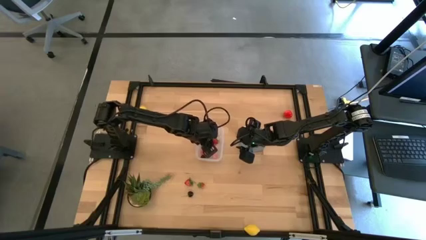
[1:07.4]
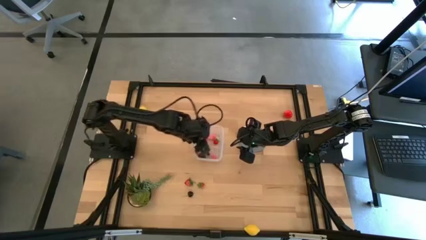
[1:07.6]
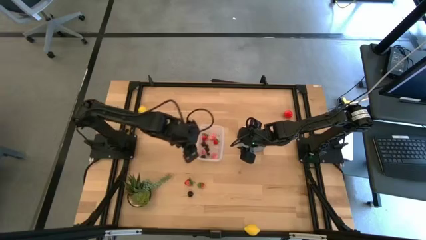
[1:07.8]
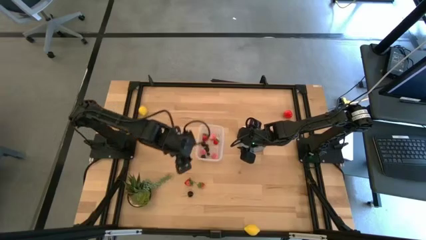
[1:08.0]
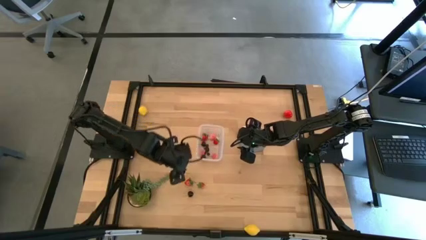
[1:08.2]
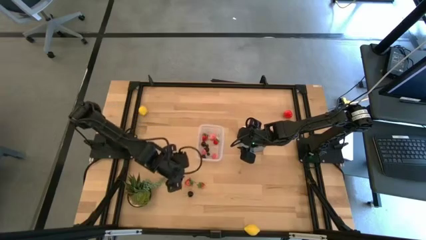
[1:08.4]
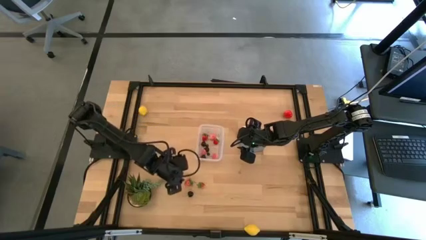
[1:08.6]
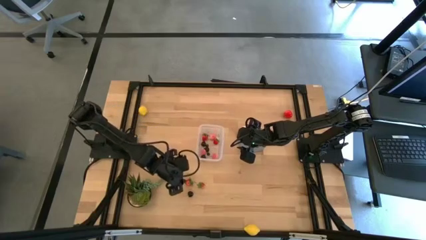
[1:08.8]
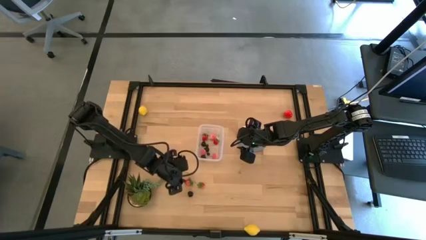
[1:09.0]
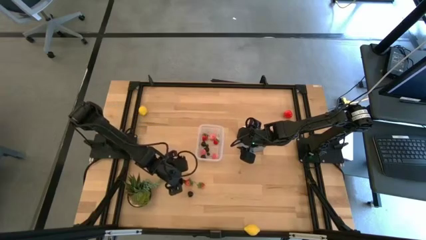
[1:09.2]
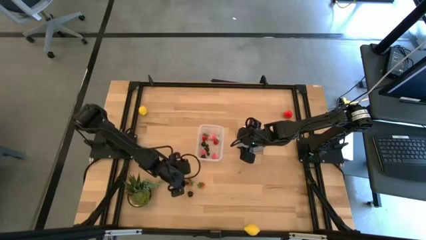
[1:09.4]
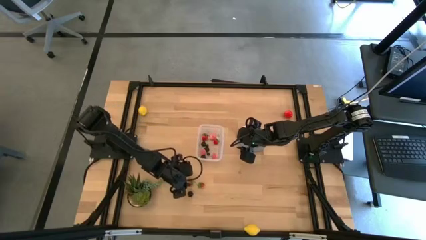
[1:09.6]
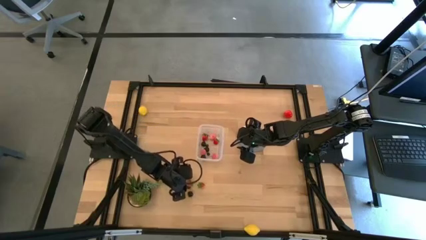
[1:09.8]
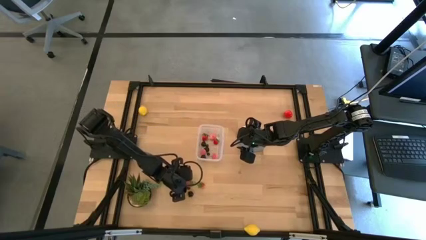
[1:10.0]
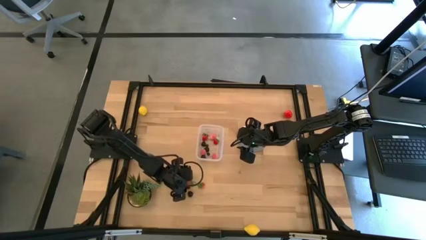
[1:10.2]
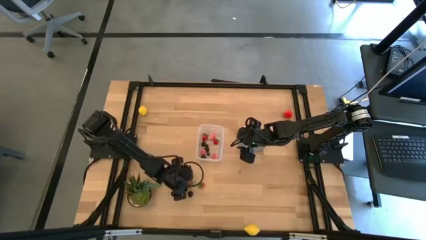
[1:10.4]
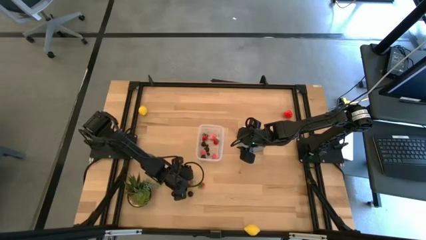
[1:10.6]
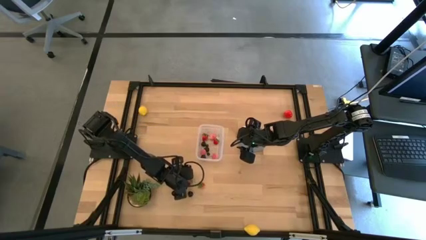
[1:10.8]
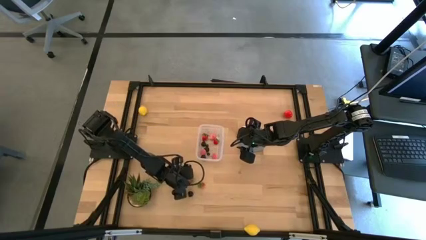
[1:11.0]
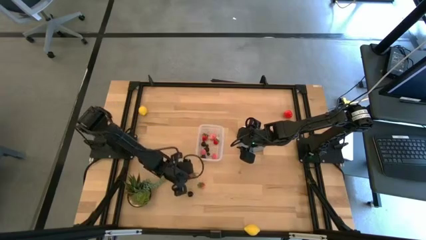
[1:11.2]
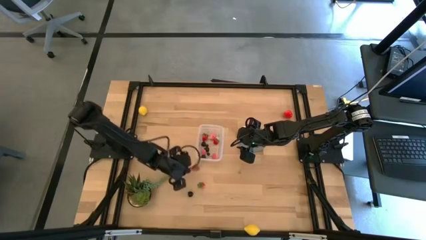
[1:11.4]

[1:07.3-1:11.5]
Task: Pick and placing Produce into tupperware
Put the strawberry into the transparent bin

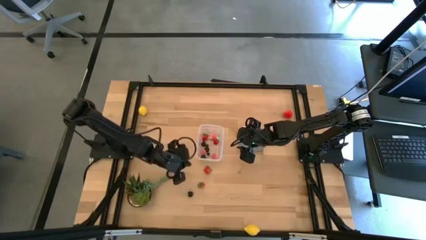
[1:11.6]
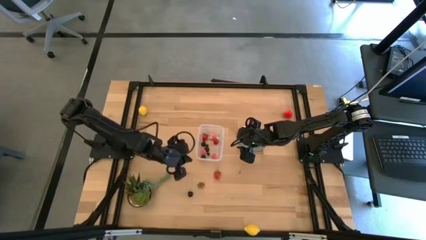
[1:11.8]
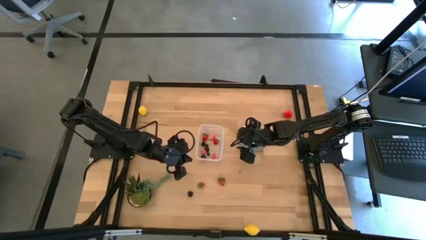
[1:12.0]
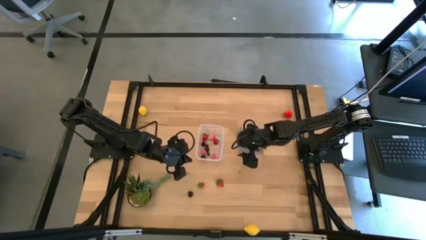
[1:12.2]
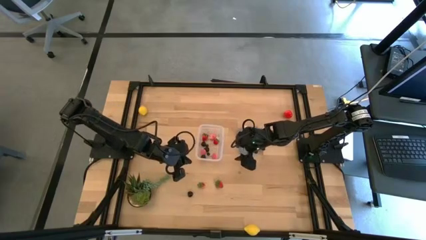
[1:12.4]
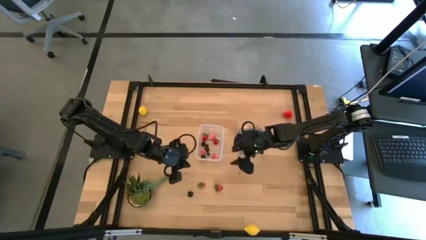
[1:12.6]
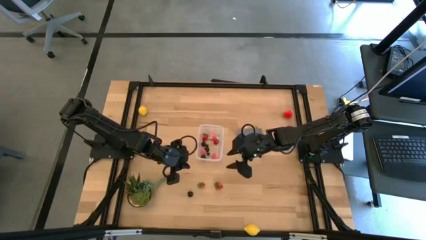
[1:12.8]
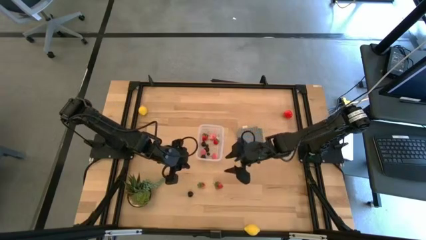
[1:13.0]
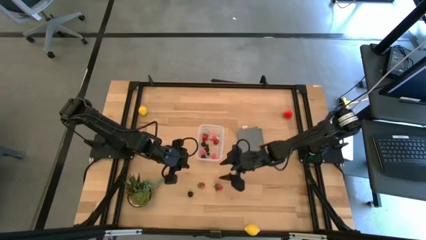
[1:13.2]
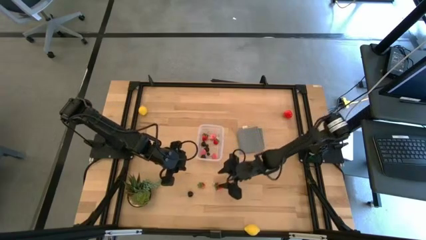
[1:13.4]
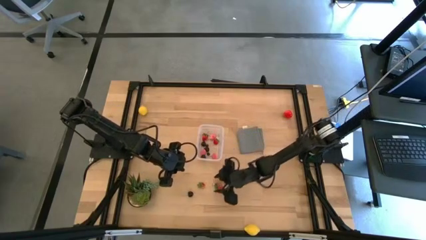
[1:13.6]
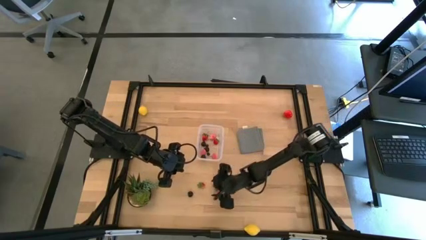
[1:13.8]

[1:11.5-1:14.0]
Put the bottom left strawberry into the transparent bin

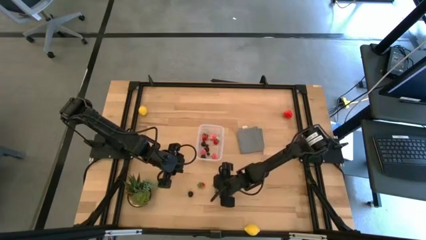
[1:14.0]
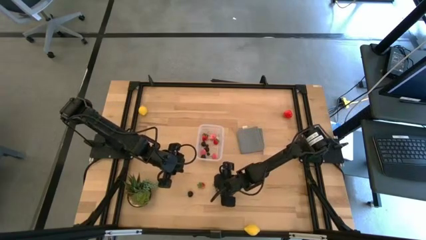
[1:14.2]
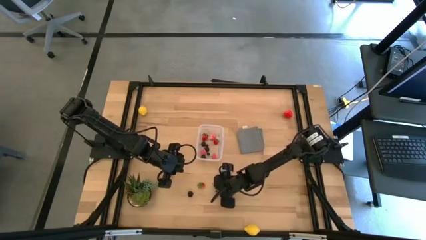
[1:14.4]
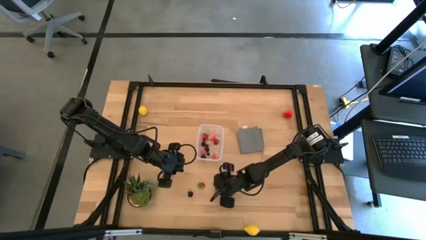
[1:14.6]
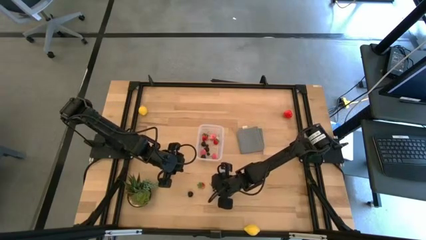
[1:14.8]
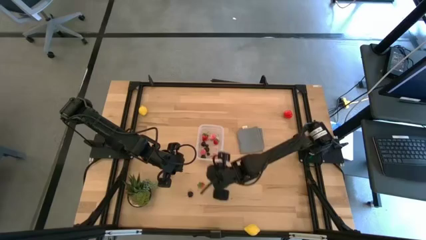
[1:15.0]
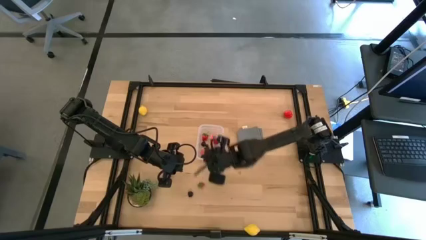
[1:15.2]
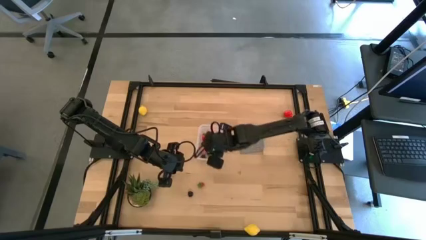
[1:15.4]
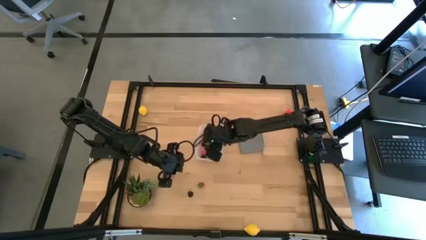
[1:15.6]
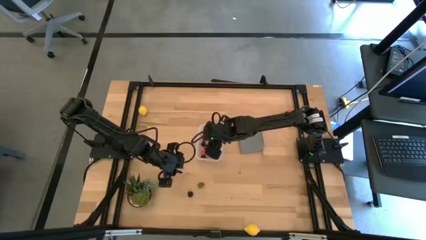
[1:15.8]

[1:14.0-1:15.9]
Put the strawberry into the transparent bin

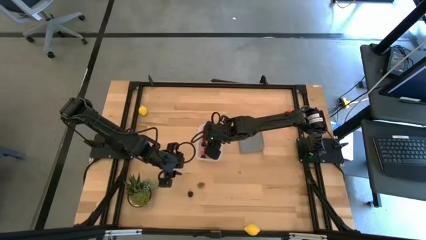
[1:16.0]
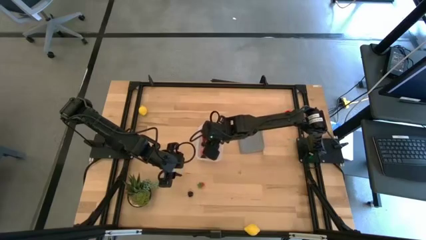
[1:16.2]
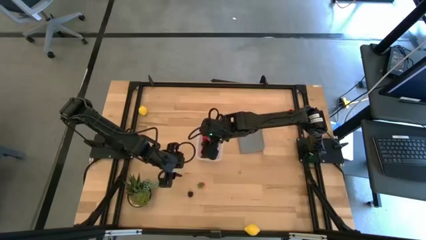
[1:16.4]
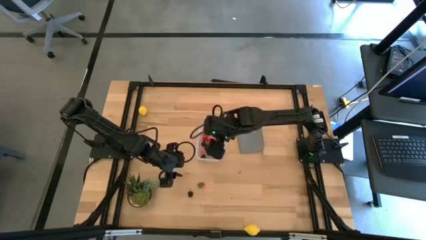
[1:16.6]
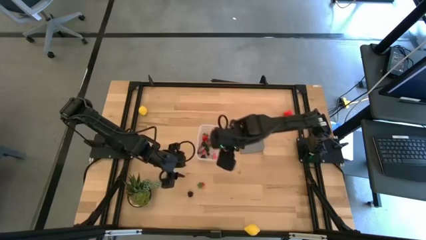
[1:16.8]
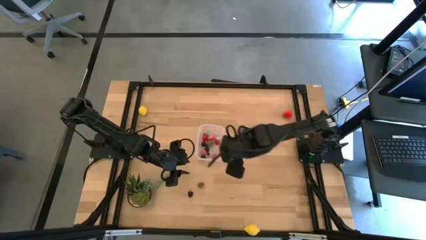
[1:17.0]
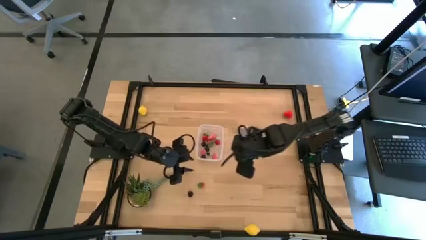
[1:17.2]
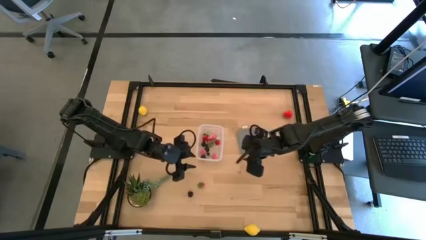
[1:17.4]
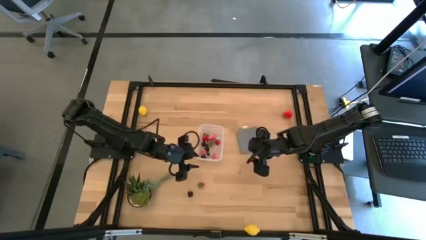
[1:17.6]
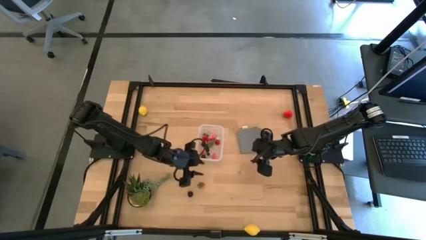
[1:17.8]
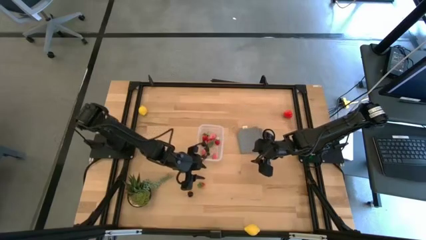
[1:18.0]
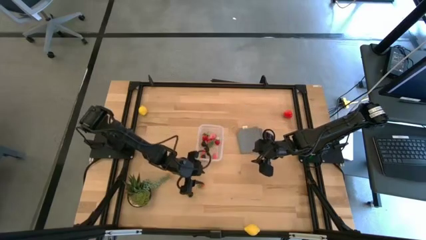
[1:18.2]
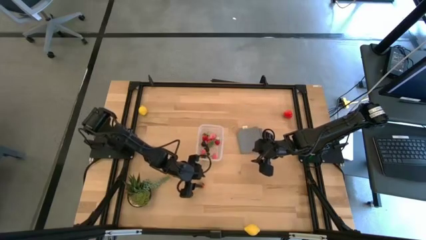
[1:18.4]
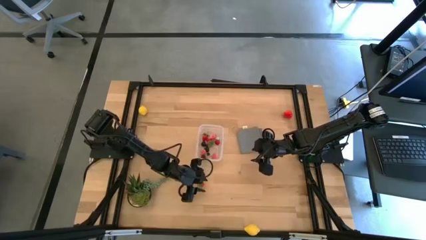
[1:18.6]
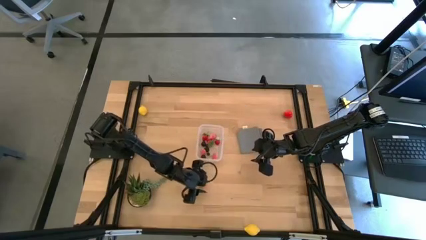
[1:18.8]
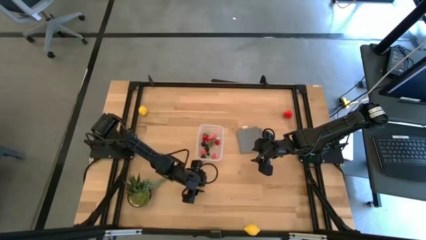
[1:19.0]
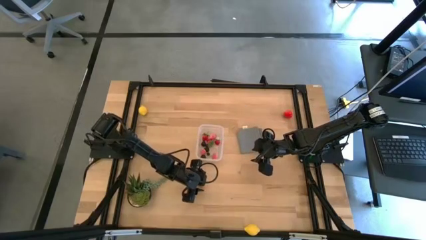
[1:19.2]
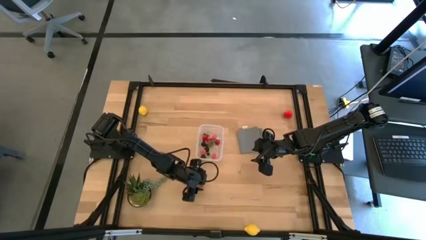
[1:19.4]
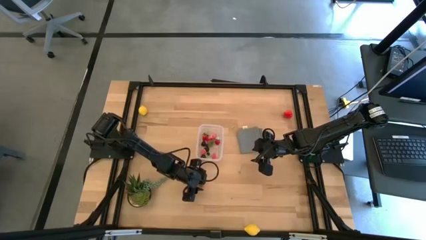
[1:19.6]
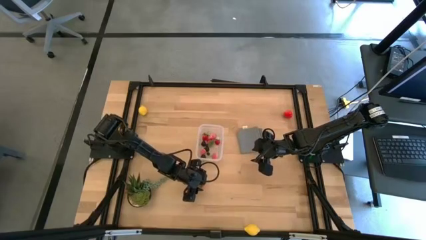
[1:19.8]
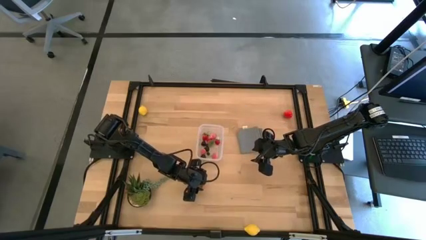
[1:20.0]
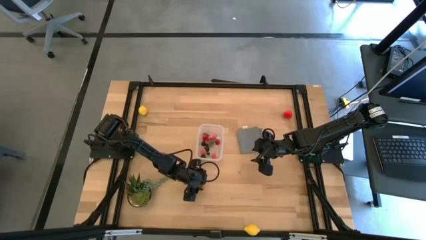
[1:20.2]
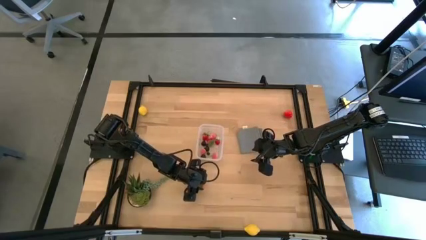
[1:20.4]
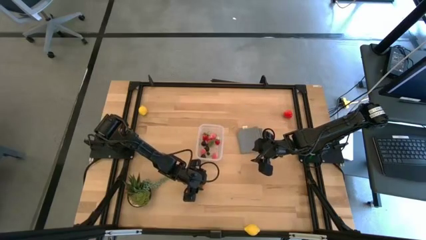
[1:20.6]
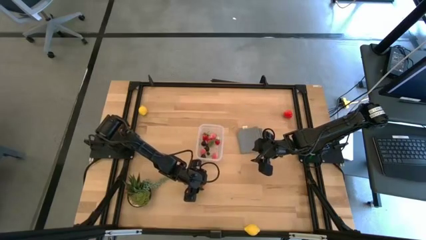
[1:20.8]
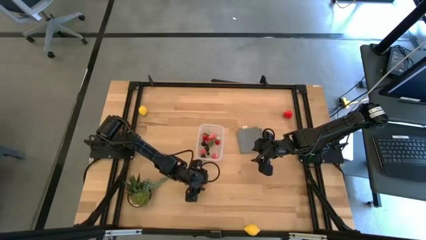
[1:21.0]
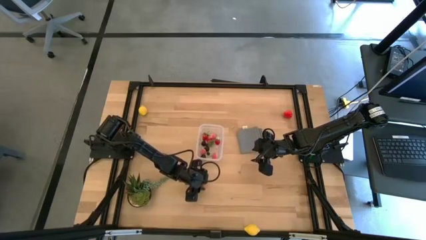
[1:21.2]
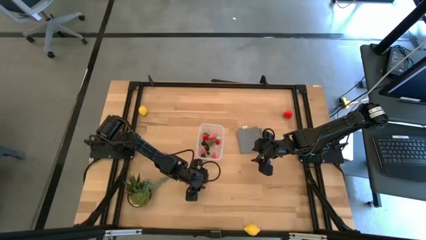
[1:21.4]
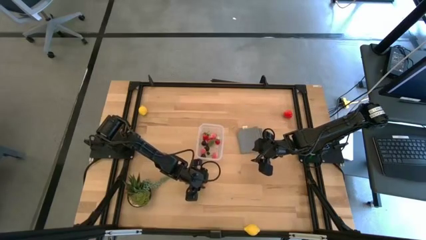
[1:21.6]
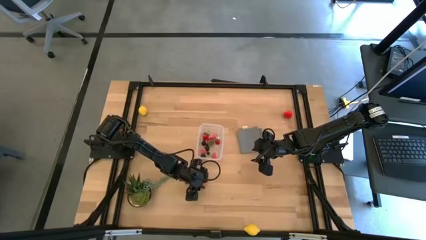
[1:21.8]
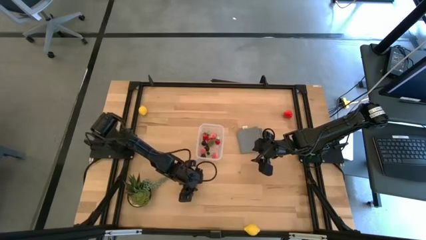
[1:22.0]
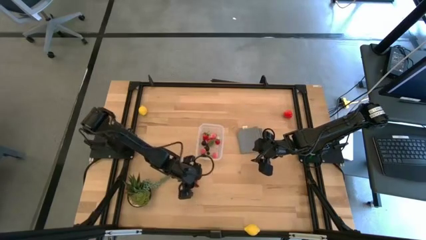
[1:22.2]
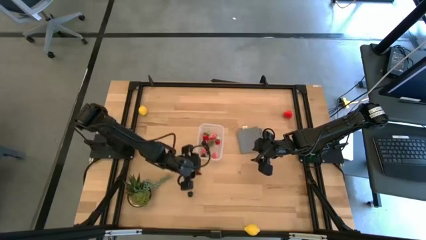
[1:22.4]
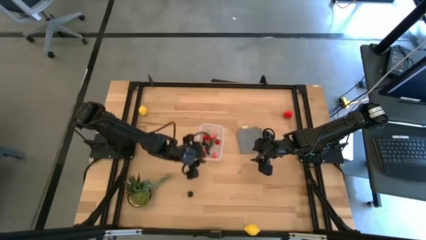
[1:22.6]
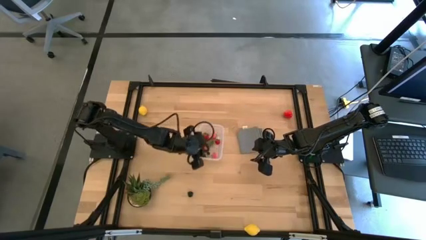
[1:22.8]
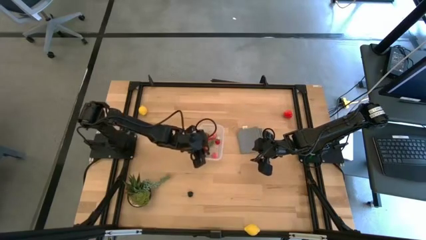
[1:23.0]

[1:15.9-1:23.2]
Put the strawberry into the transparent bin

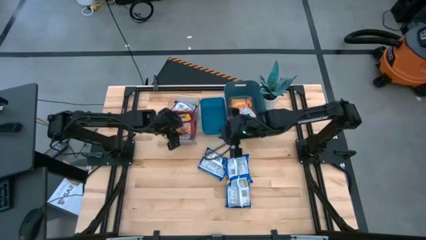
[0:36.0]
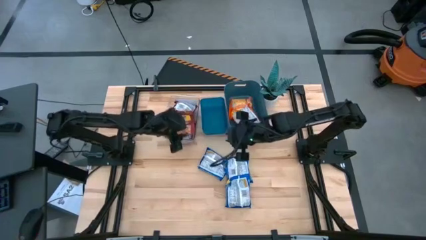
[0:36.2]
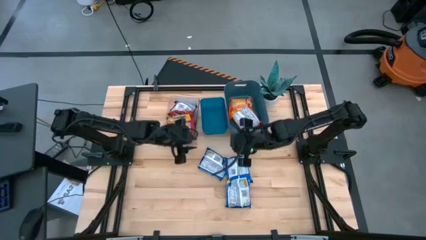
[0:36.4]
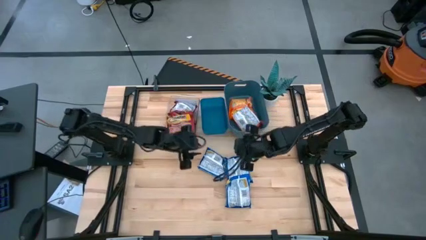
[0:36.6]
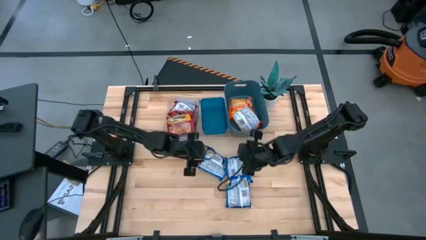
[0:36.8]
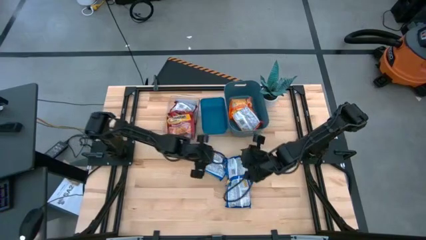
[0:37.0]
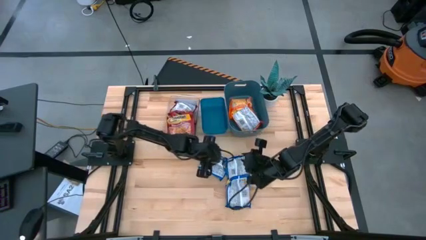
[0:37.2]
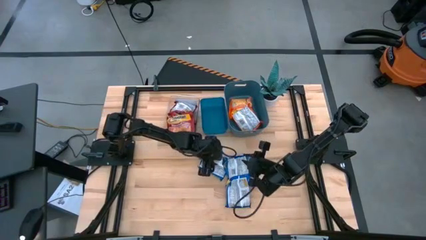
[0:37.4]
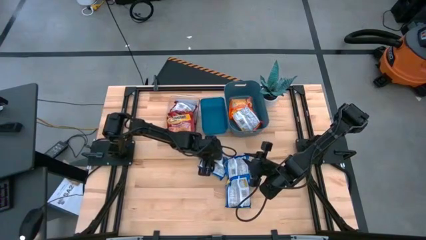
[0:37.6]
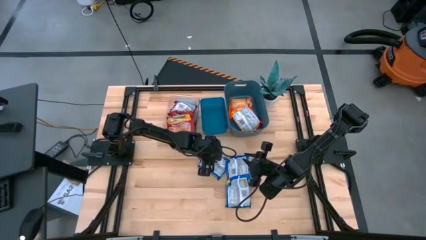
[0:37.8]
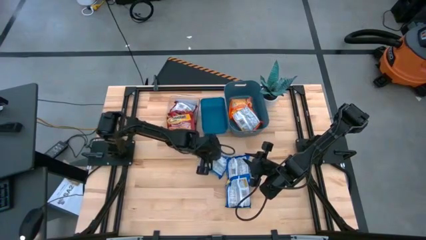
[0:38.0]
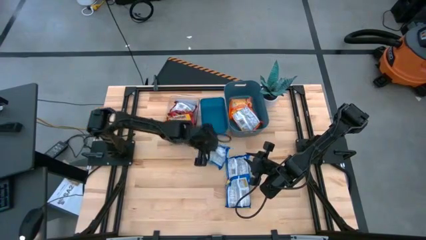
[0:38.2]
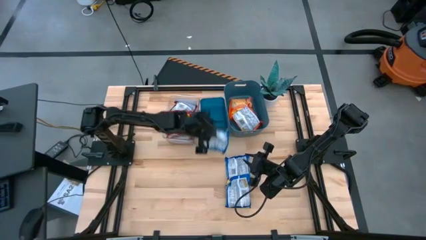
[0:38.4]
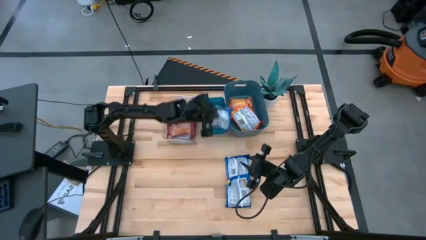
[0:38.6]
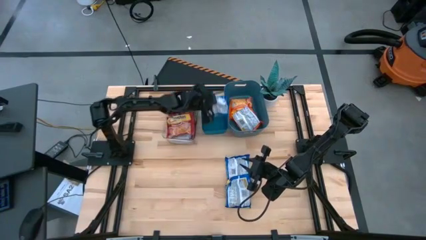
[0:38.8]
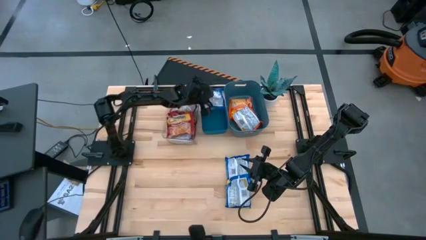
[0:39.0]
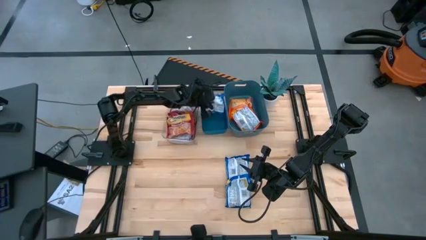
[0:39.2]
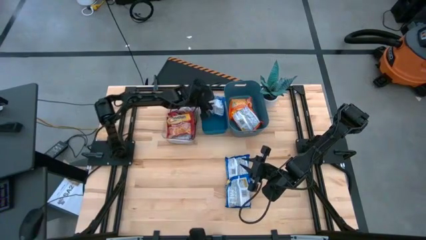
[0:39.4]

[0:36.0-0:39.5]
Task: Sort Maruchan noodles
Put the blue noodle pack into the blue bin
